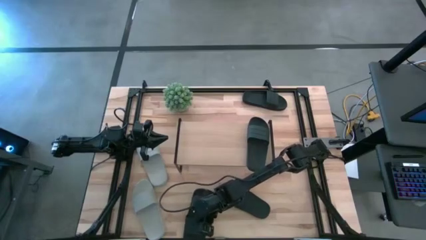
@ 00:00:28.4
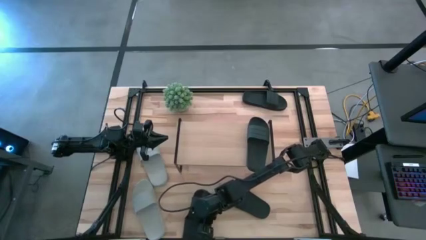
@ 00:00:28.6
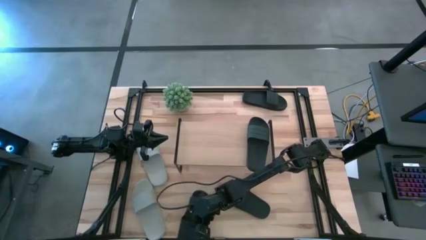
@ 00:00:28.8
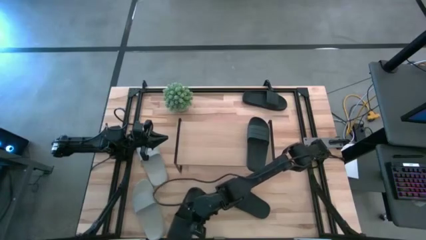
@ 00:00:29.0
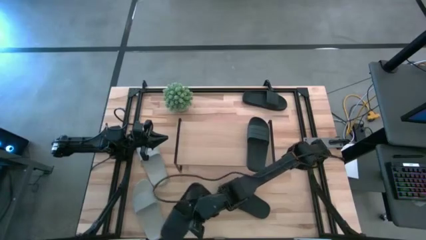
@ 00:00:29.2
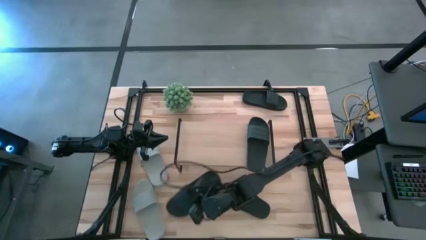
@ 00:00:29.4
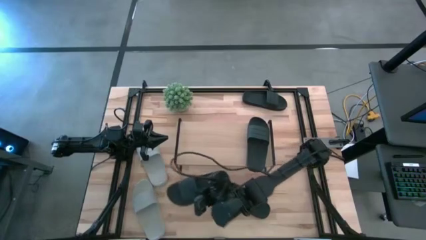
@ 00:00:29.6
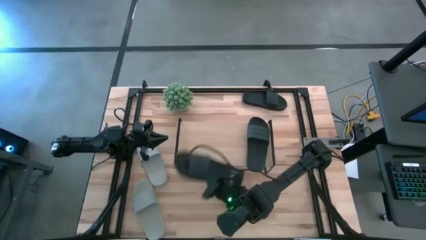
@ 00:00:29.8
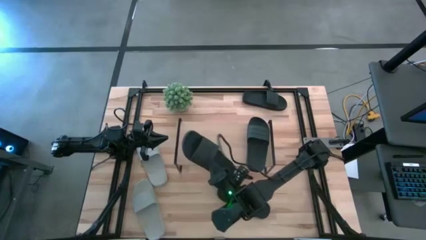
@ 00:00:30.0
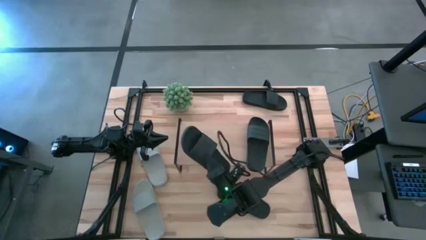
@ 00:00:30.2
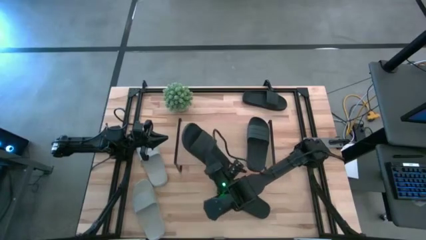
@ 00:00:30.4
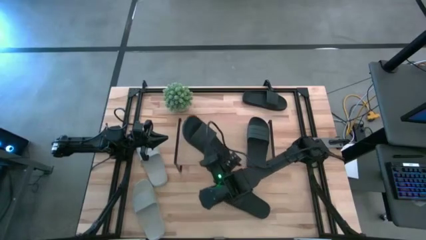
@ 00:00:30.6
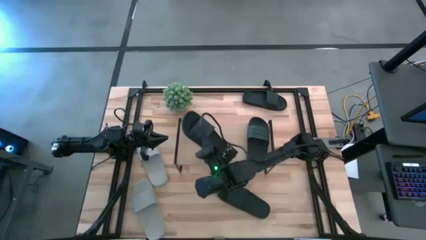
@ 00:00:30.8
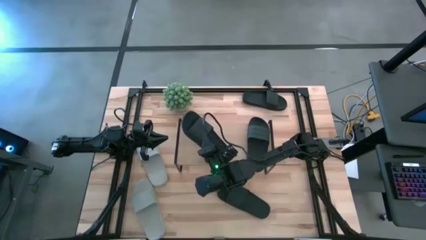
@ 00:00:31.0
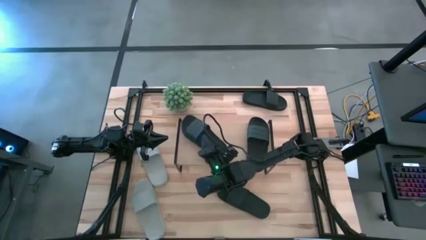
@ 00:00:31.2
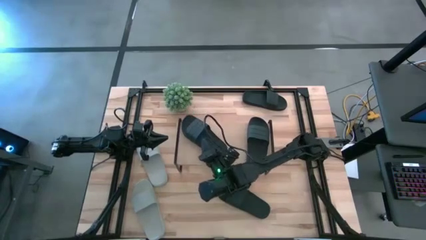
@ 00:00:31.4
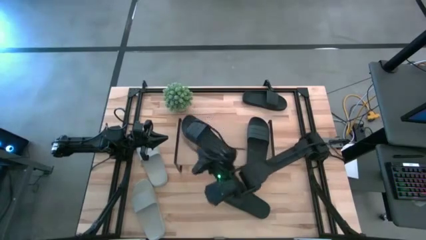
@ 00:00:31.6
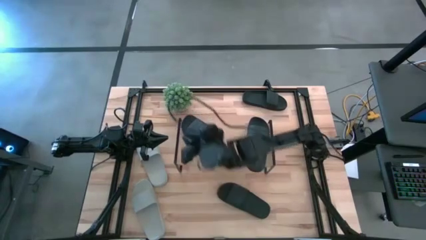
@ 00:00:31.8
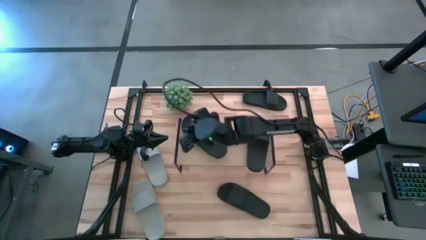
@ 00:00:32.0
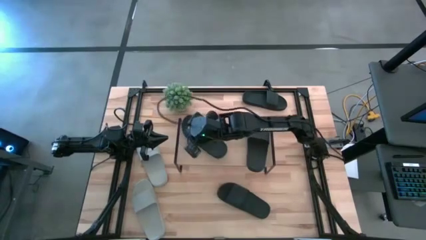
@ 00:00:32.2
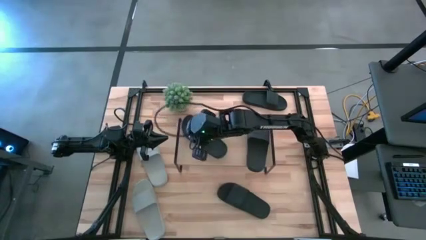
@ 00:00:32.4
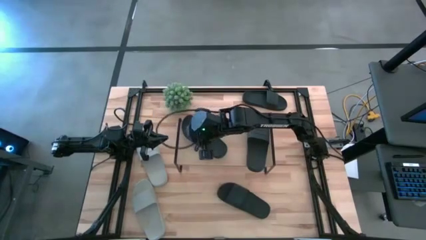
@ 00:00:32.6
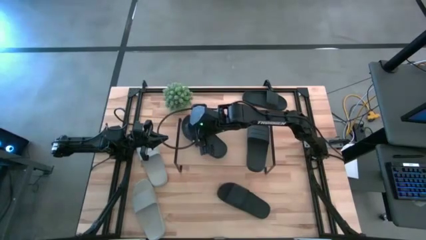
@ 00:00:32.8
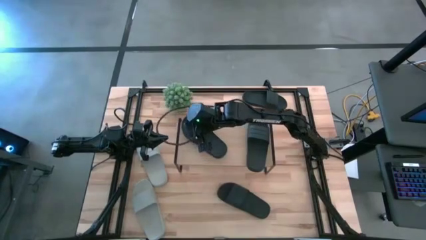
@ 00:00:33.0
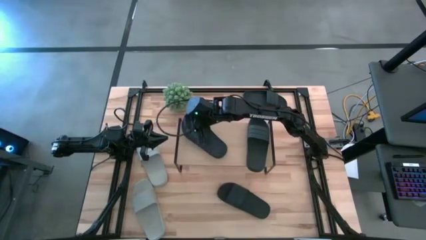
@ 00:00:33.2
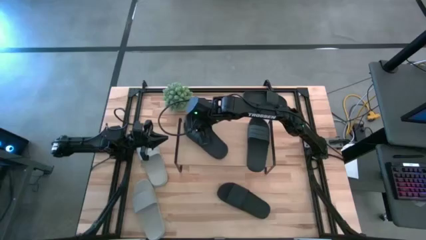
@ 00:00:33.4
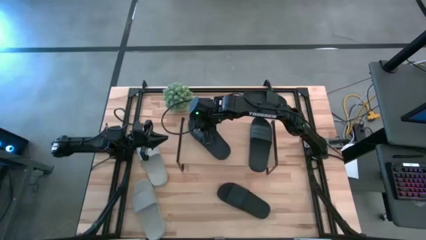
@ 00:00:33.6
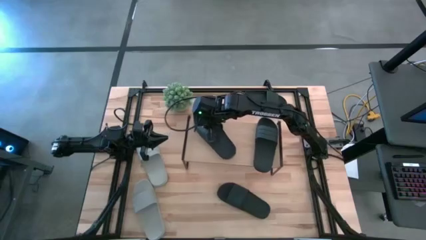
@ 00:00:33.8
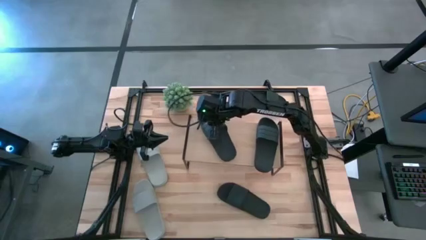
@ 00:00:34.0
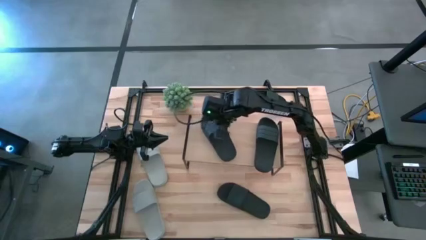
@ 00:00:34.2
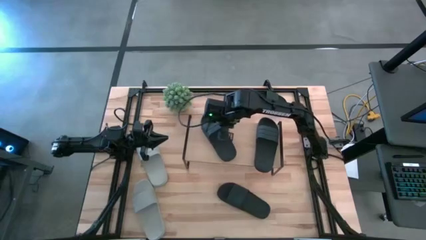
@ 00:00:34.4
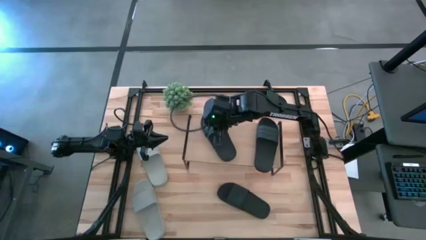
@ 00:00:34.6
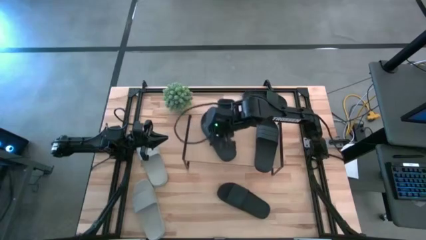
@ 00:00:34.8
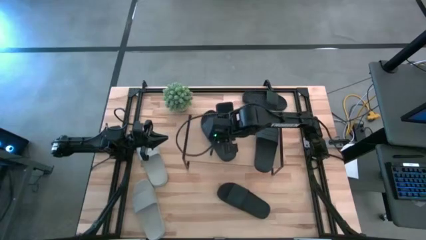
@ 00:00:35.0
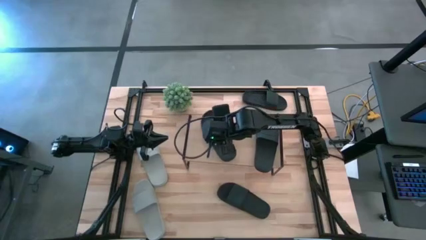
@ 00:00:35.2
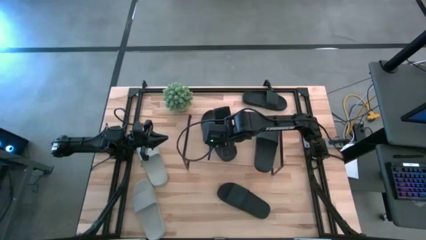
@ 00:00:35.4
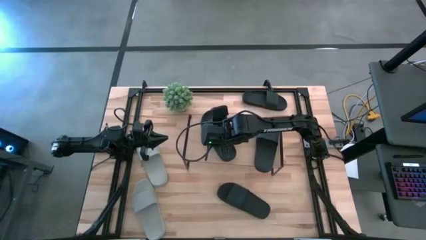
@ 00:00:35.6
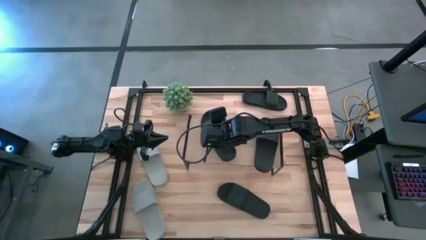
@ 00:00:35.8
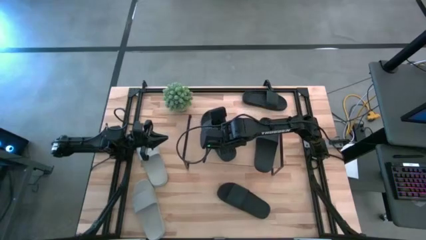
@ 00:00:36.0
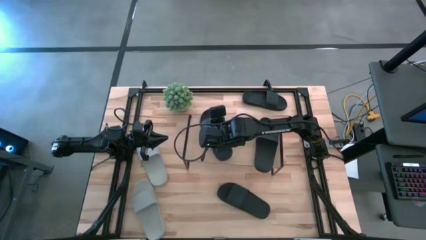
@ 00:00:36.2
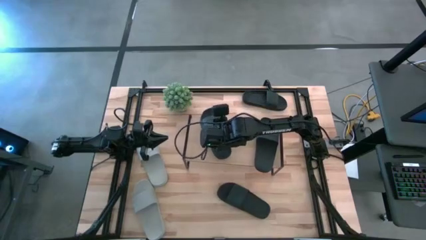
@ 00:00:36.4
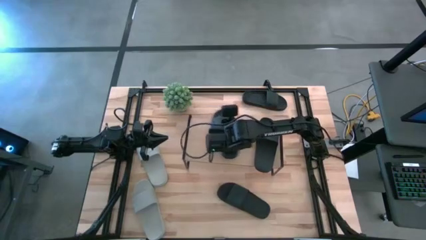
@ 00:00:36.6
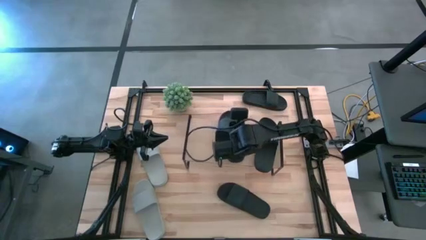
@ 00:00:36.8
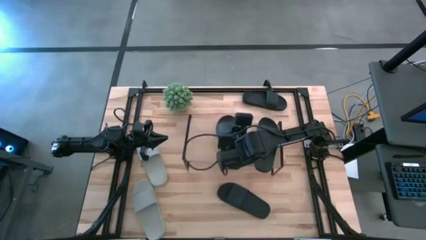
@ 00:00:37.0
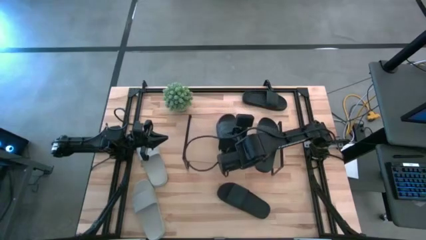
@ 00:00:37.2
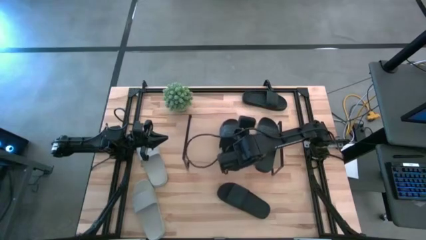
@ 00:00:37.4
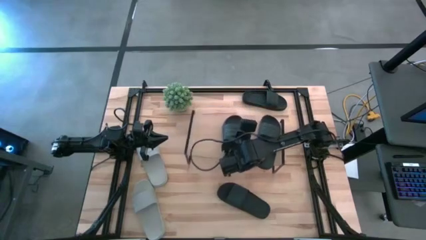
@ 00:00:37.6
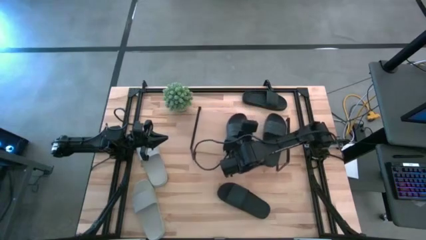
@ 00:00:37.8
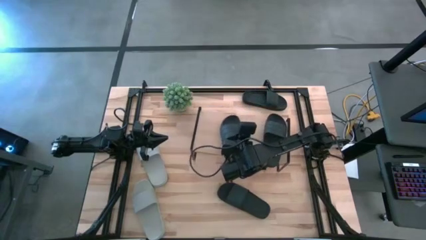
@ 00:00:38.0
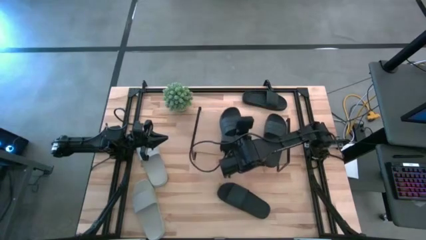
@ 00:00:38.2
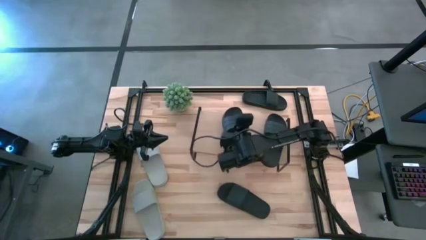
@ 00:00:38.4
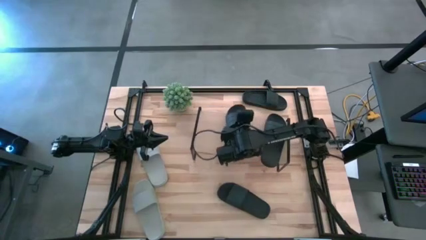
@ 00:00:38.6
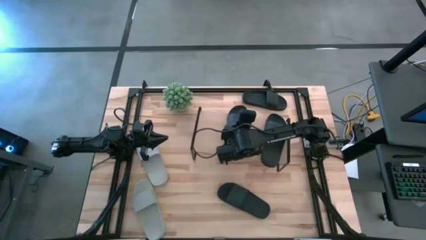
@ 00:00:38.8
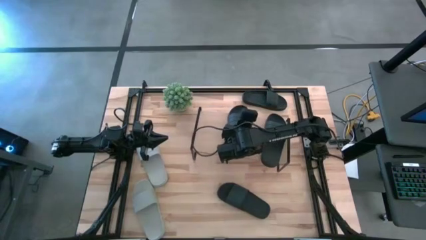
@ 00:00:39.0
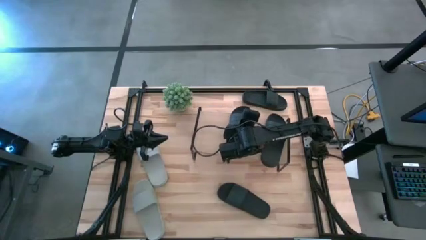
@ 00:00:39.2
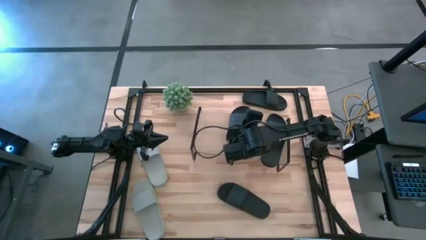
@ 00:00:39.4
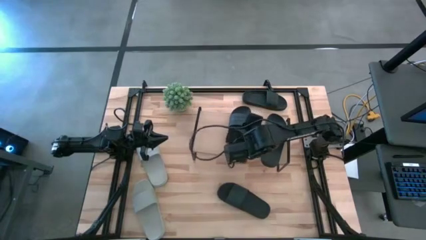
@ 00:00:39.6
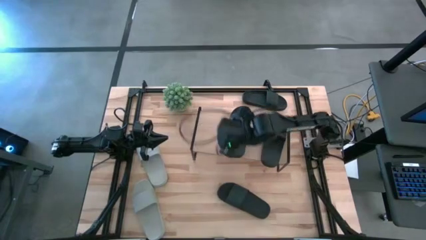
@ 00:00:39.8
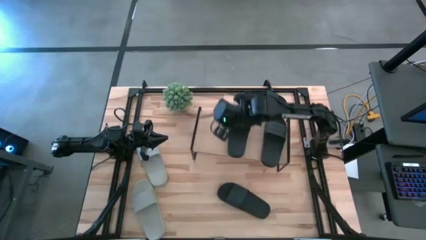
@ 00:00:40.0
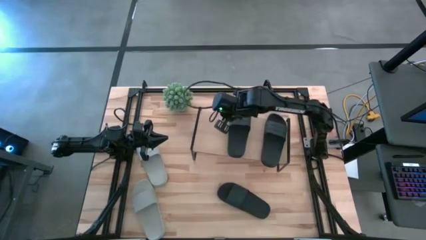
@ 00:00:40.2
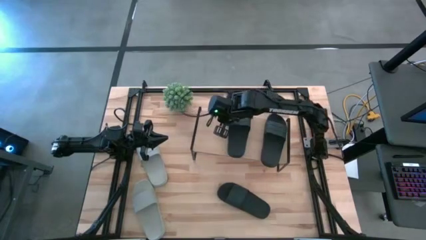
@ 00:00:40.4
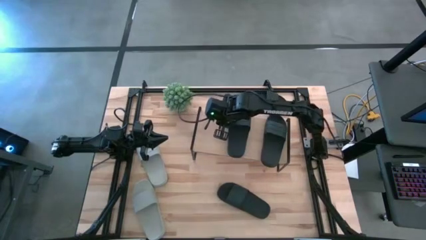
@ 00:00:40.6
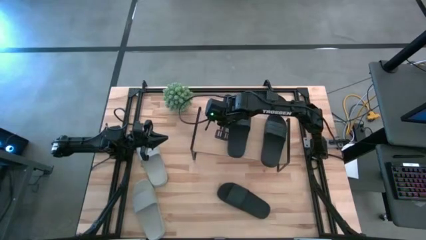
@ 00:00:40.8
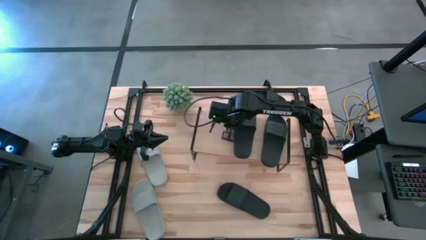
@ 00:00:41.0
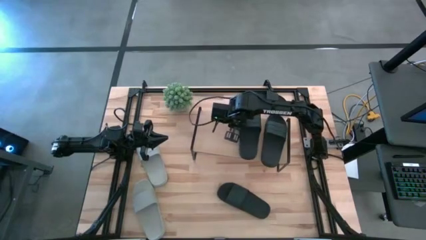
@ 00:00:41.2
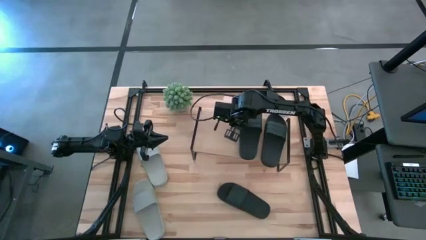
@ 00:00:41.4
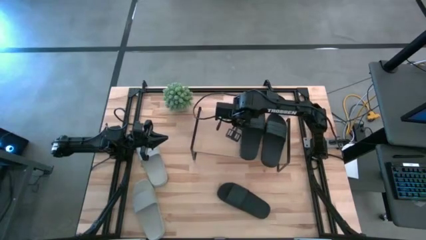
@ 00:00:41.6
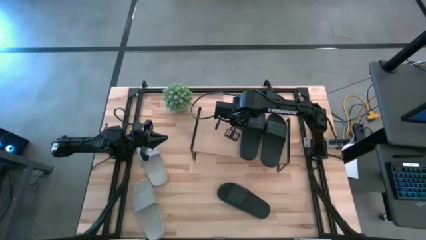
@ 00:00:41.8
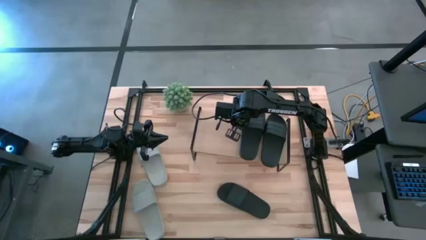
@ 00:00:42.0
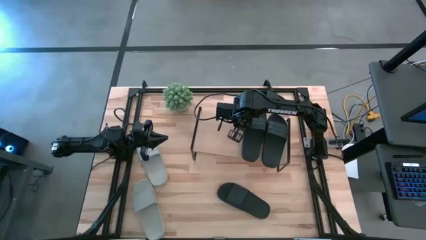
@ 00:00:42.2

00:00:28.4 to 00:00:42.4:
Task: Pick and place slides into the shelf
Put the black slipper on the shelf

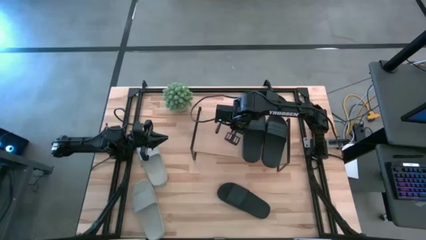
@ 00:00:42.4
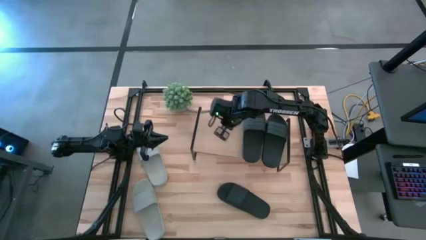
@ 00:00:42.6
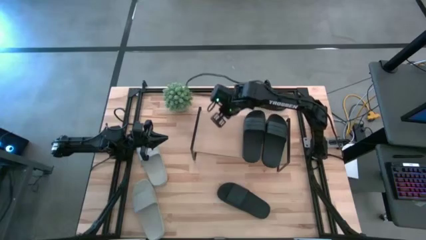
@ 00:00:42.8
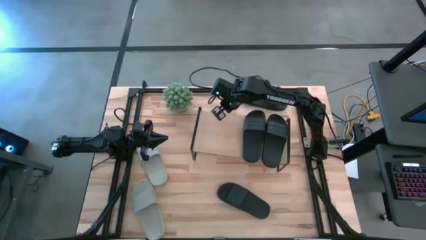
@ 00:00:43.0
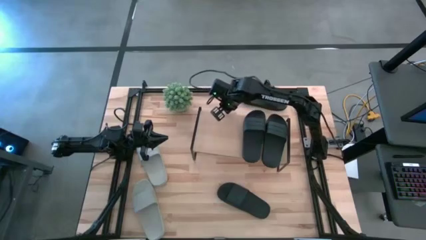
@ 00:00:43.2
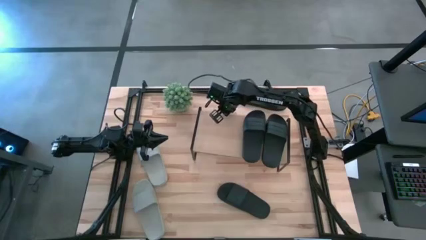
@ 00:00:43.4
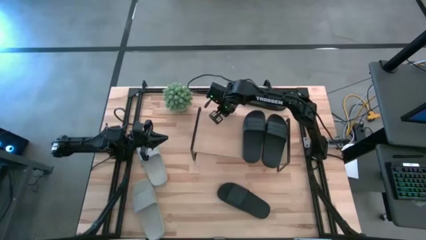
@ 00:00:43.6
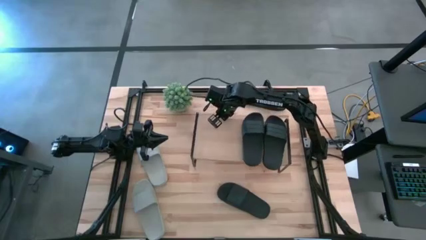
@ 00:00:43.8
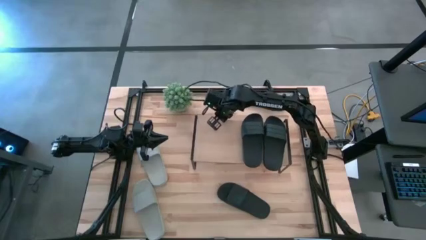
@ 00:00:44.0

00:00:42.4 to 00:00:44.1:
Adjust the shelf
